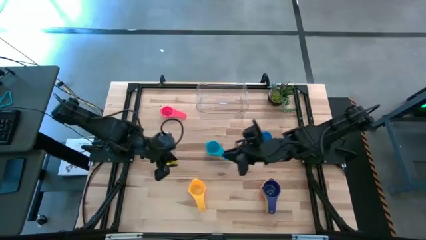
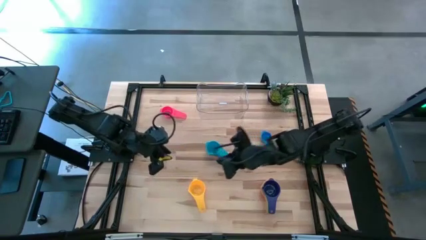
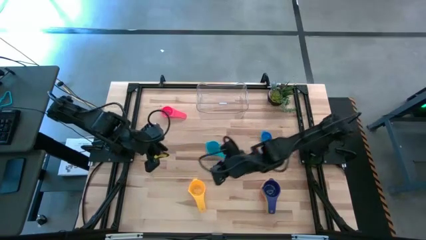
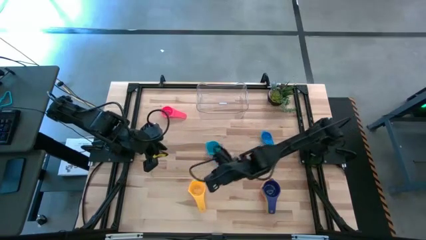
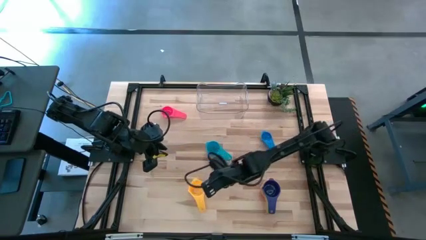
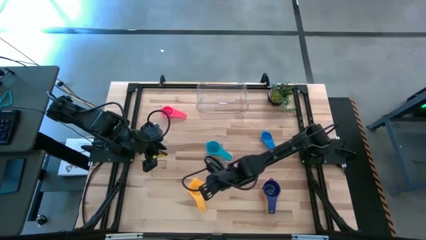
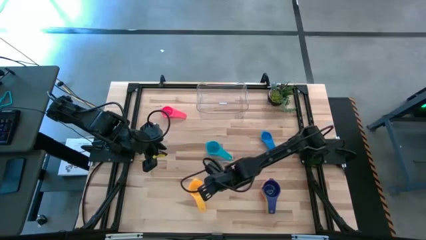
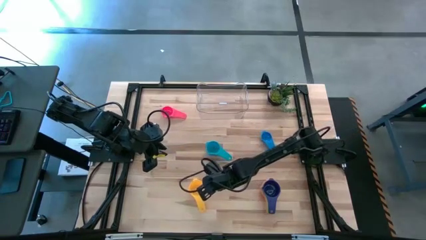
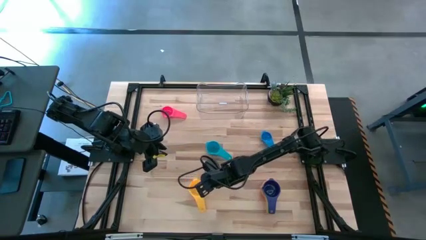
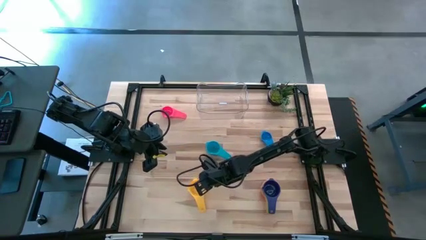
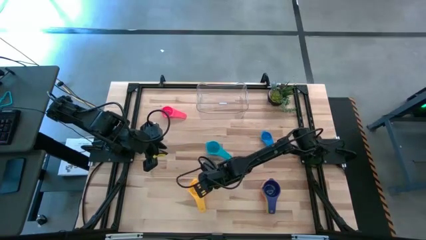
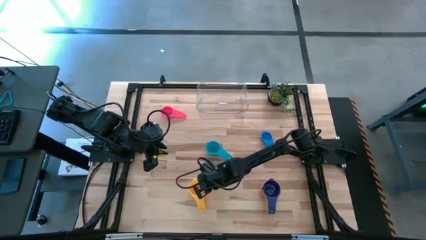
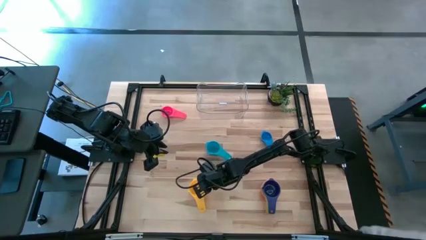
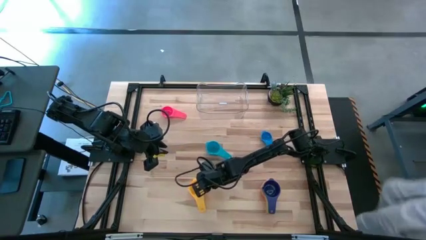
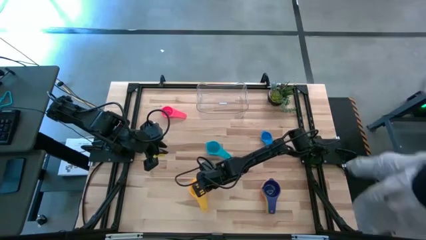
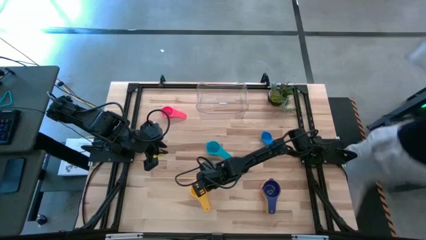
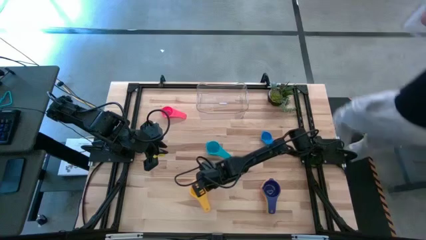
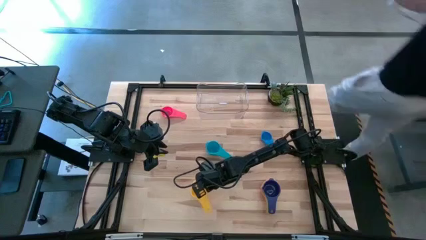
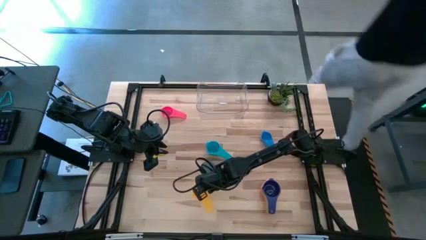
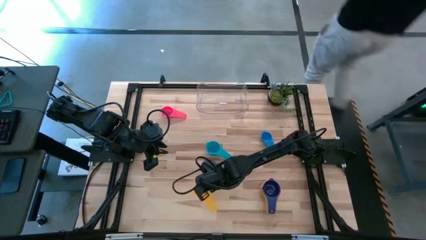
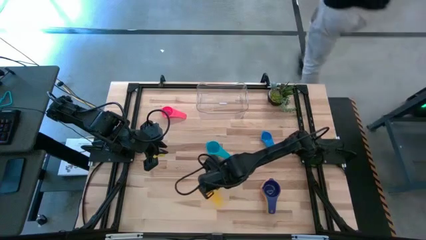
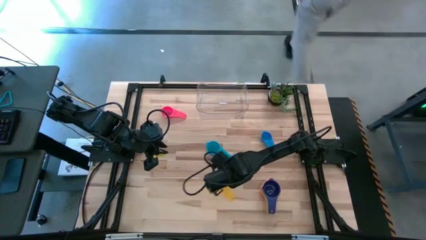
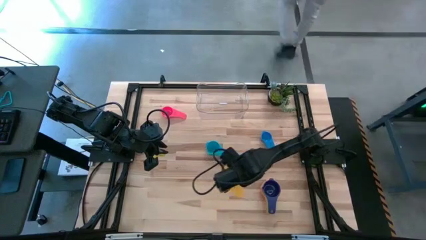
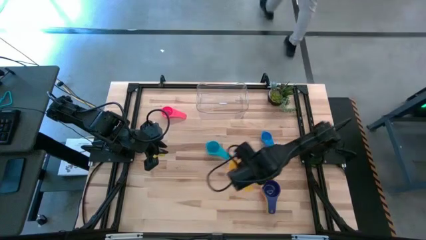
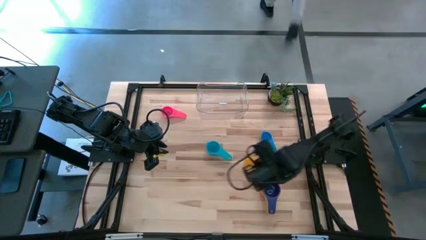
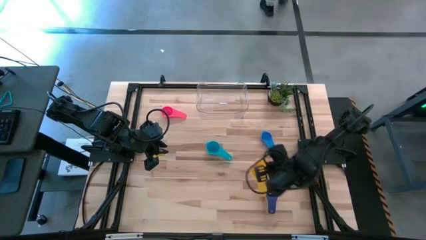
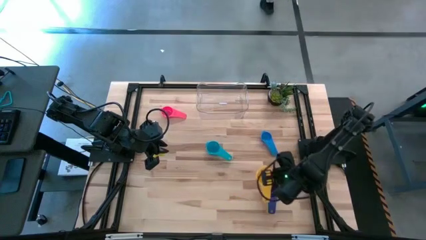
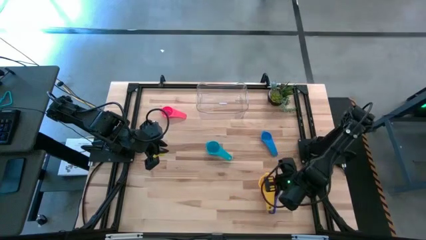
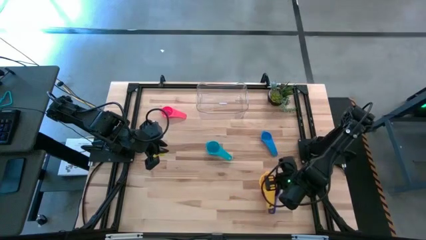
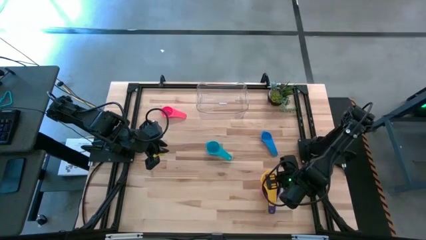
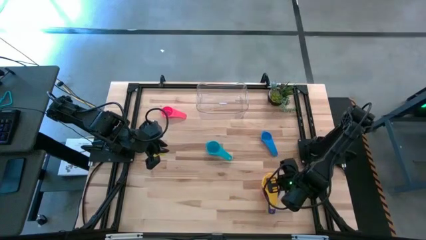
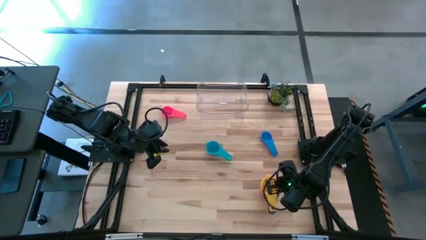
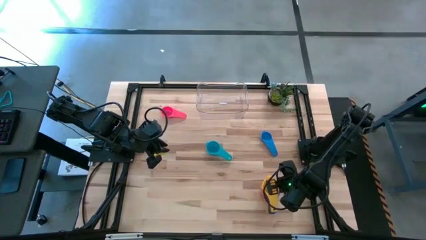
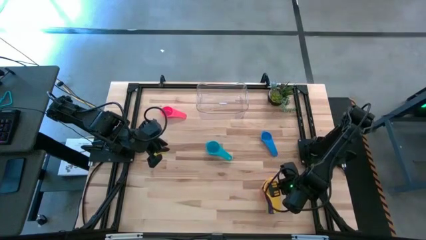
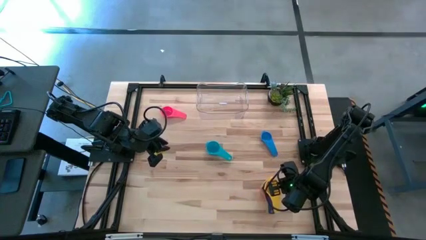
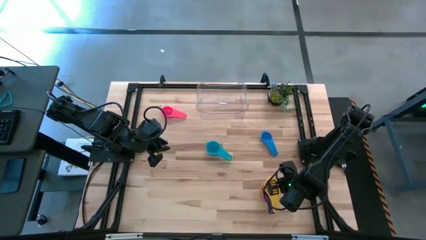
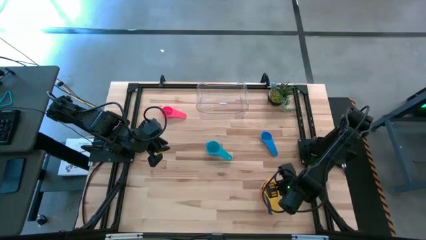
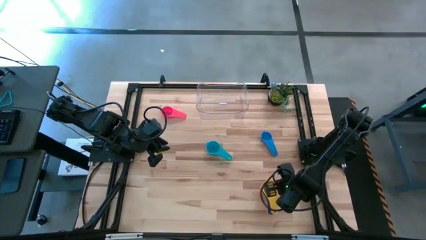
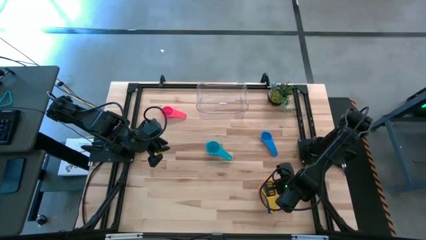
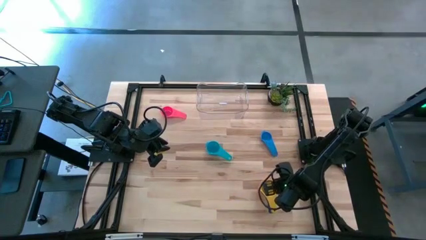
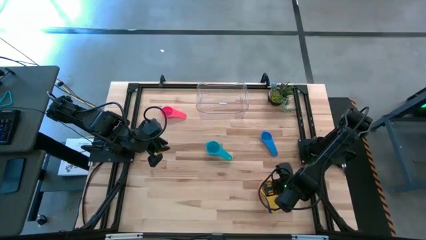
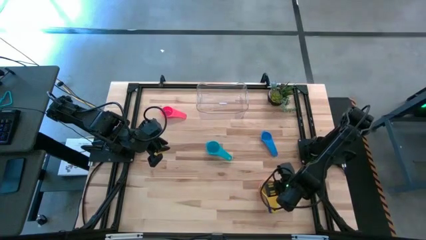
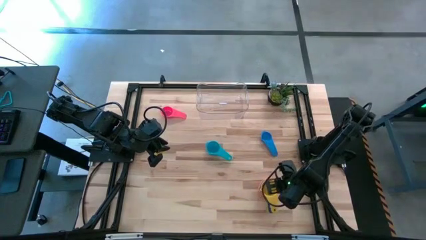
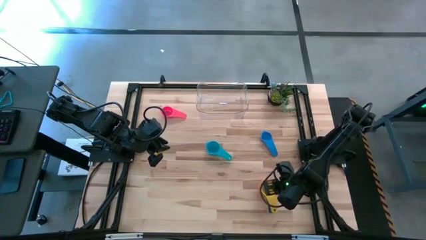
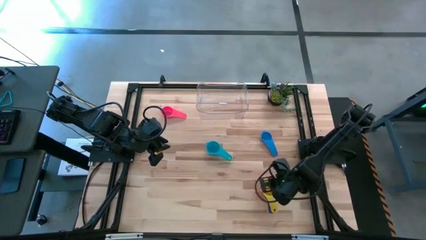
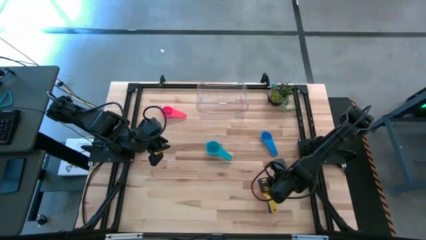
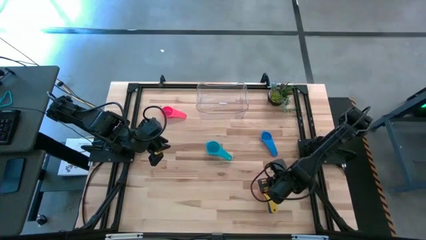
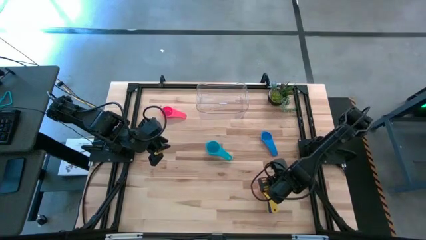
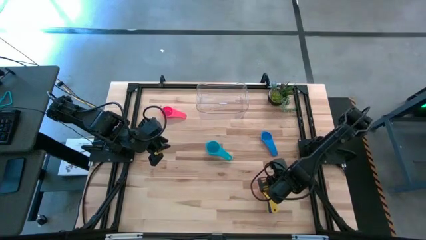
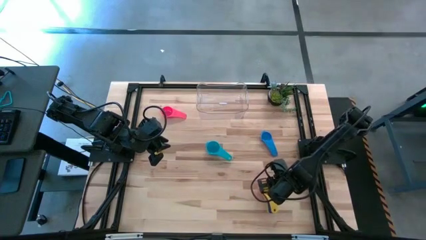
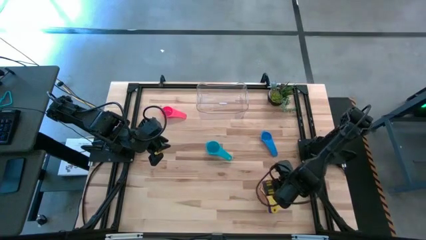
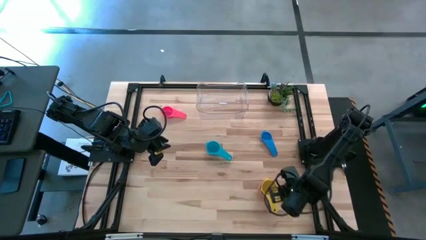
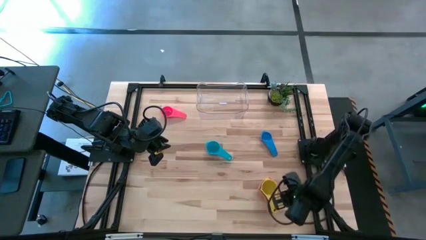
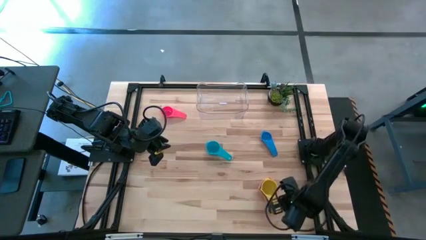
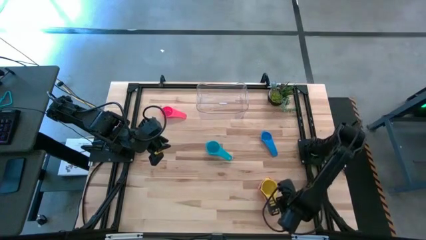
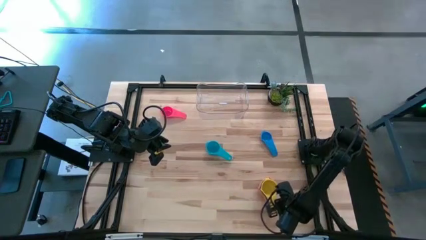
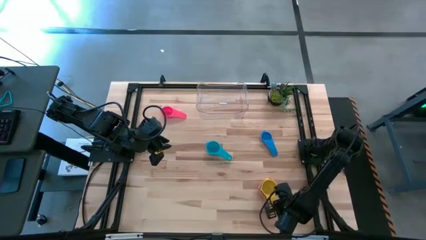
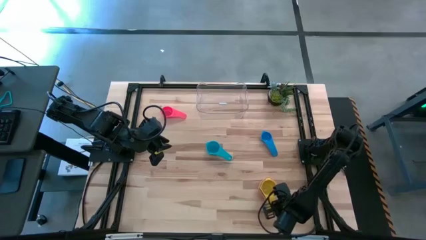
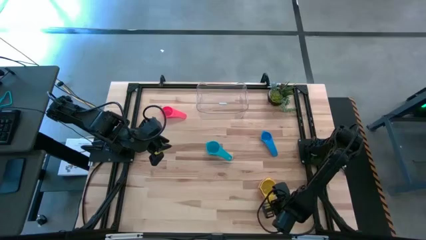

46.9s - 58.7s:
Task: Nest measuring cups in basket
Stack the yellow measuring cup on top of the dark blue measuring cup

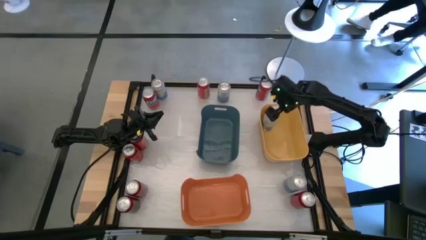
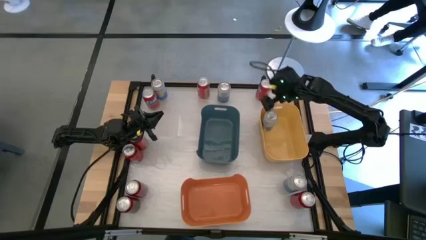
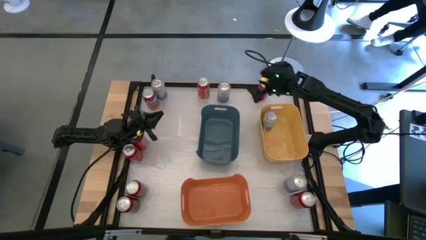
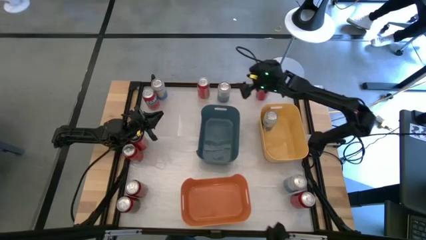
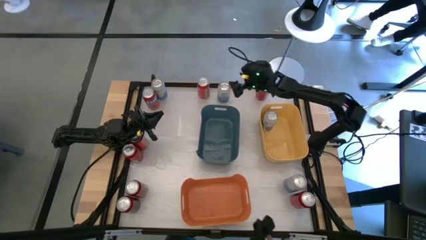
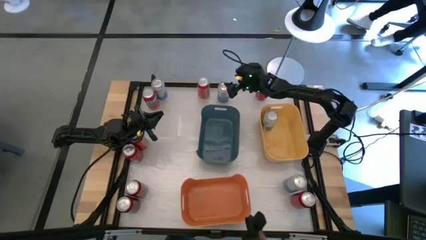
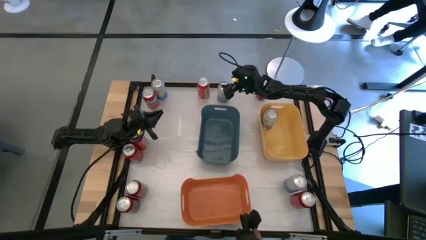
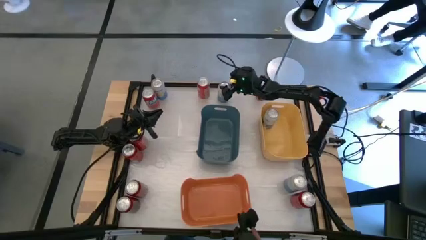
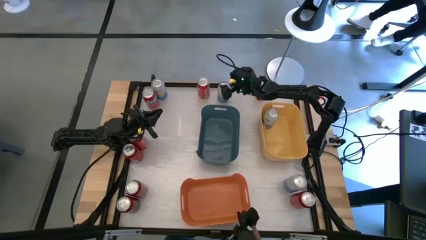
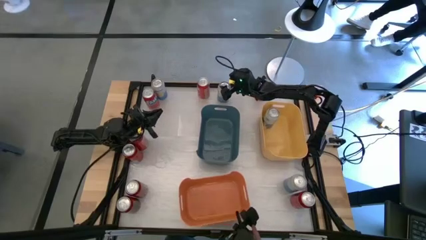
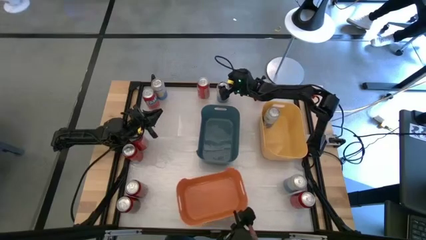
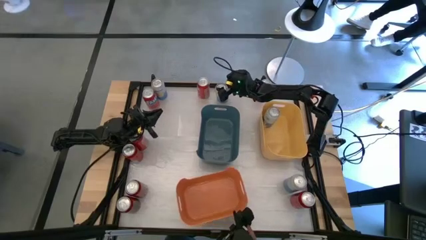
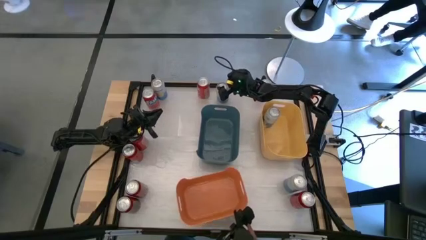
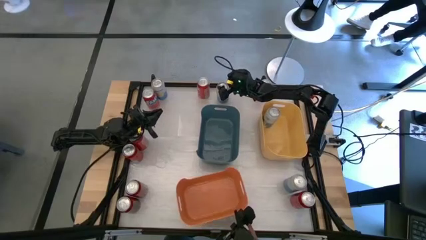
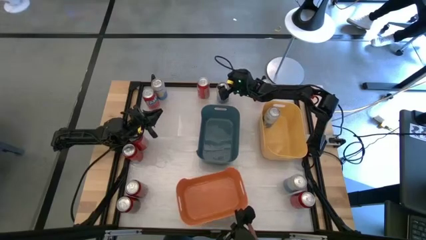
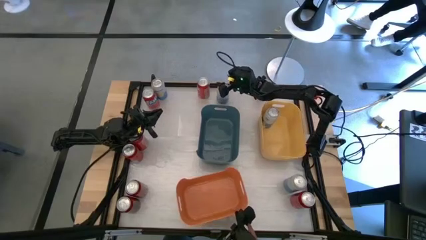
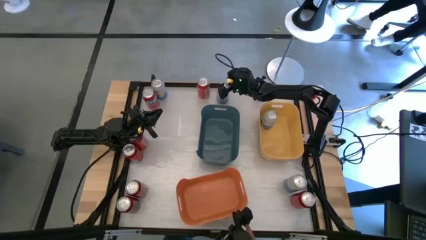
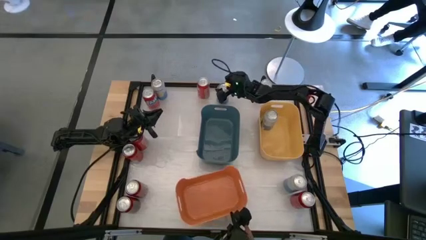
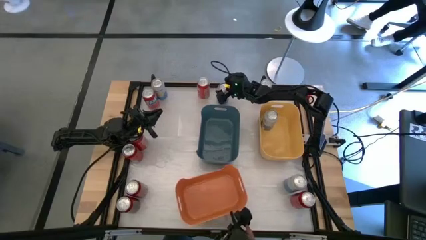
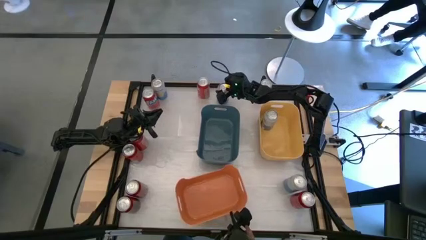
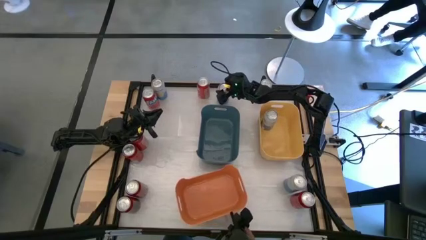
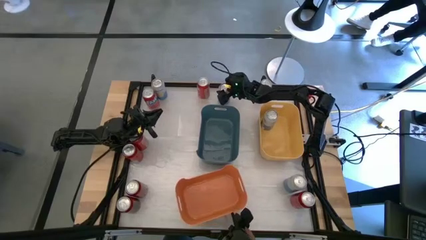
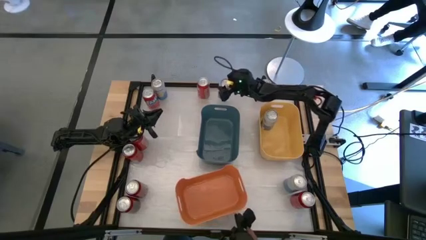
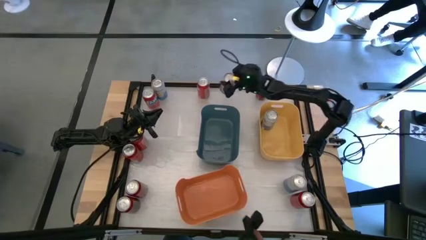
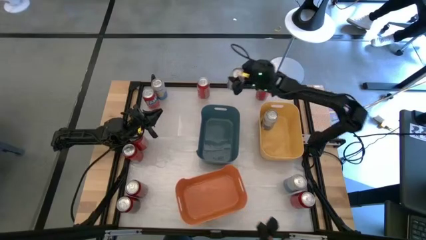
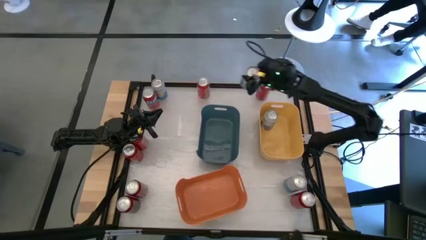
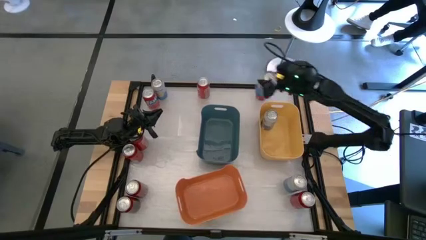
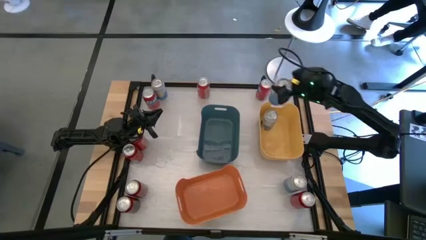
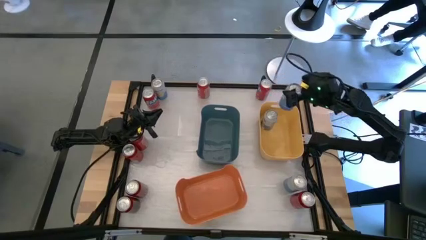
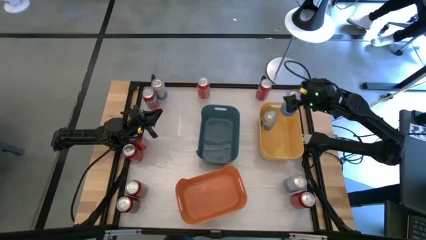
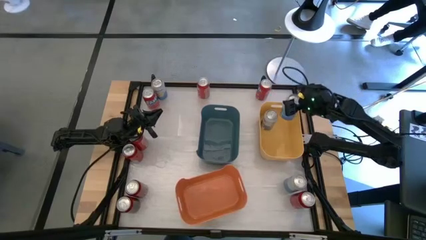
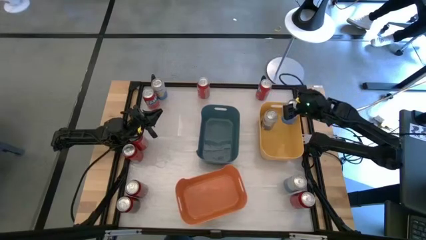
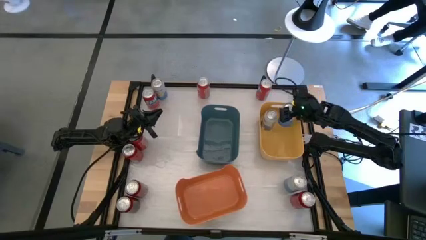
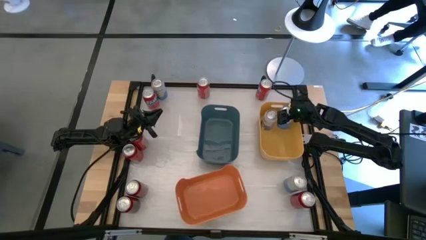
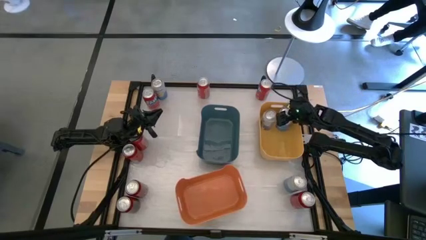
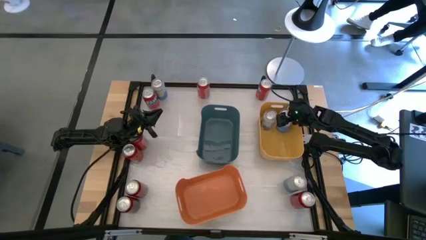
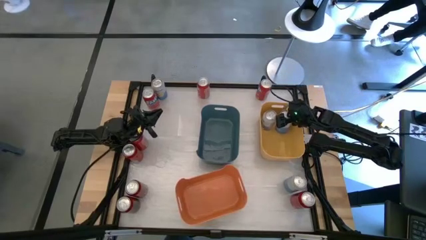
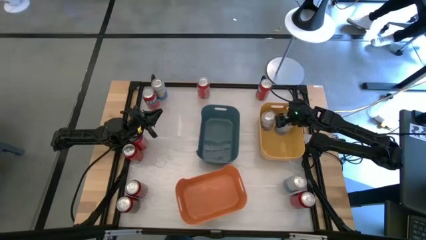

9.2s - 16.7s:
Task: Sort soda cans
Put the top right white soda can into the yellow bin
